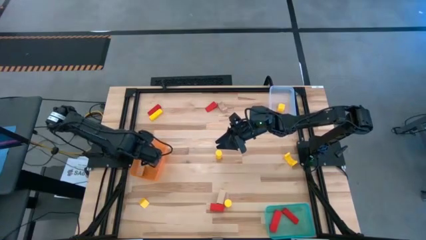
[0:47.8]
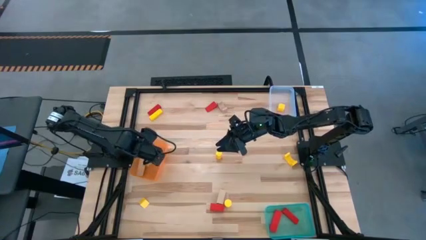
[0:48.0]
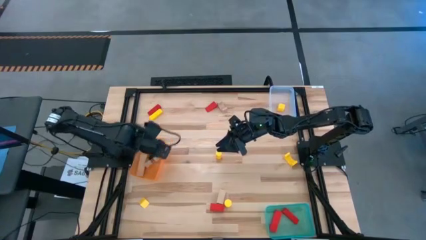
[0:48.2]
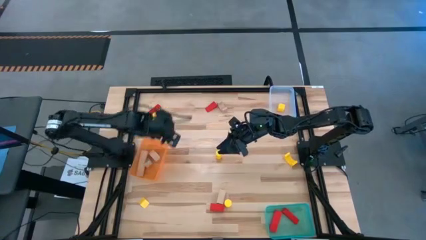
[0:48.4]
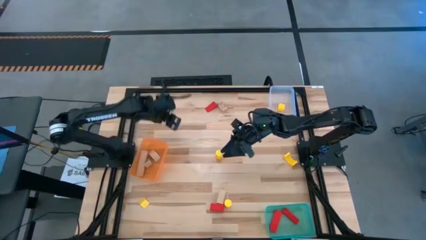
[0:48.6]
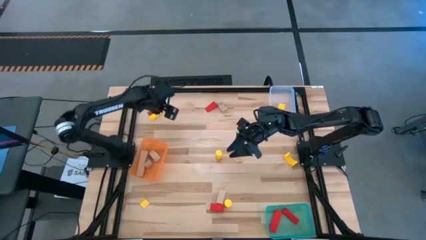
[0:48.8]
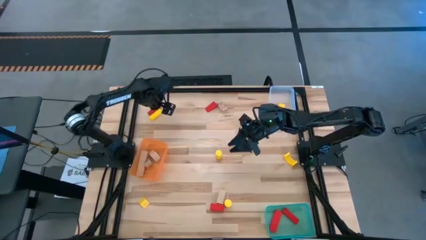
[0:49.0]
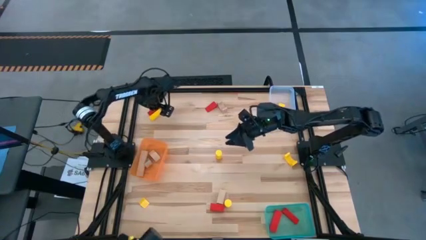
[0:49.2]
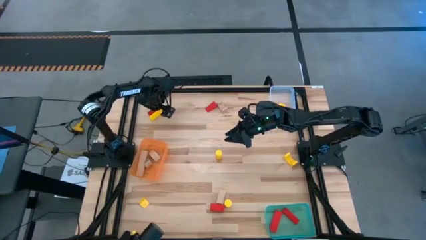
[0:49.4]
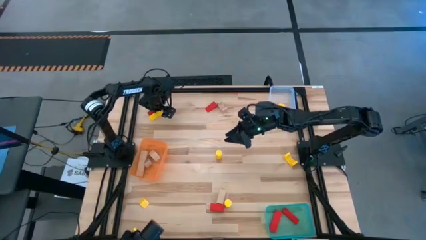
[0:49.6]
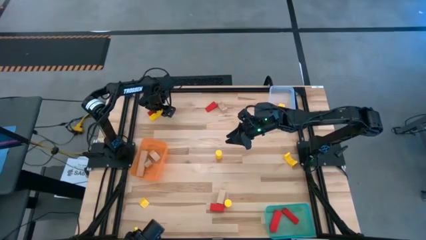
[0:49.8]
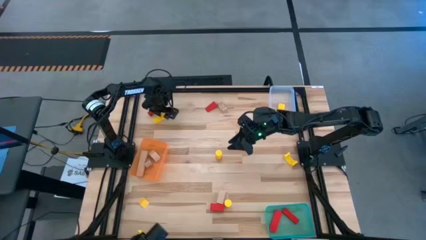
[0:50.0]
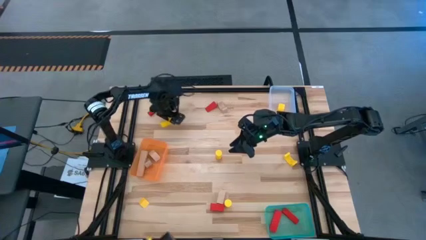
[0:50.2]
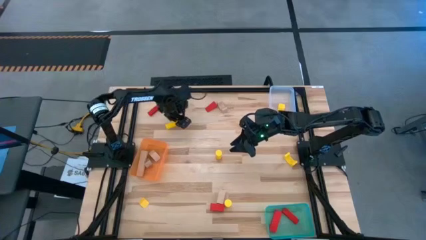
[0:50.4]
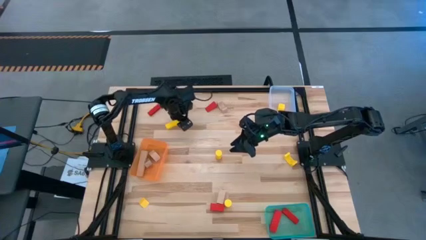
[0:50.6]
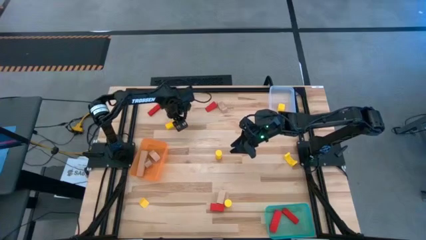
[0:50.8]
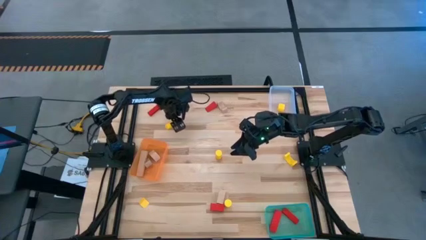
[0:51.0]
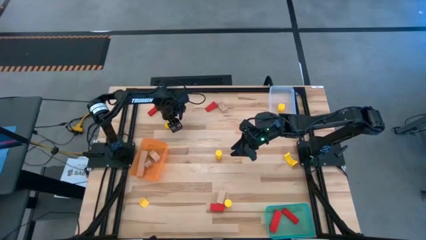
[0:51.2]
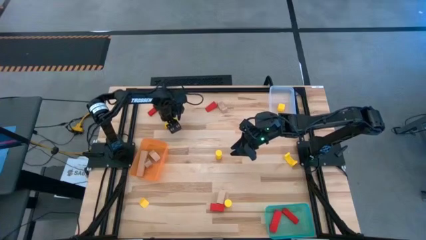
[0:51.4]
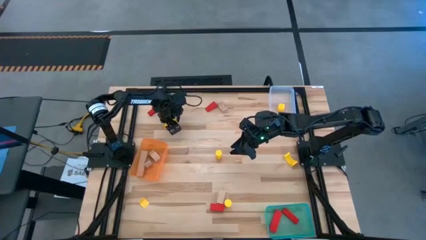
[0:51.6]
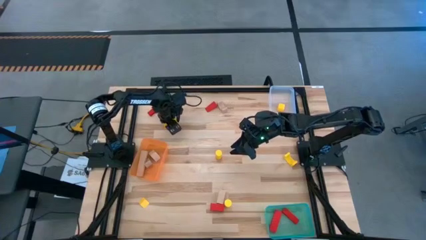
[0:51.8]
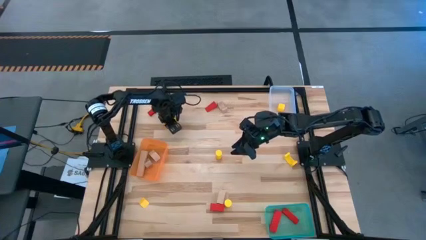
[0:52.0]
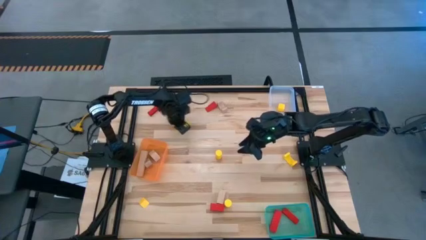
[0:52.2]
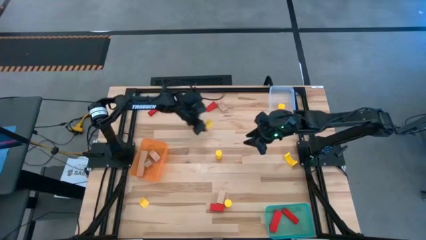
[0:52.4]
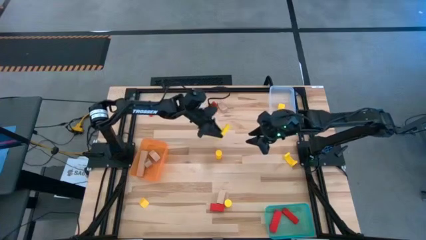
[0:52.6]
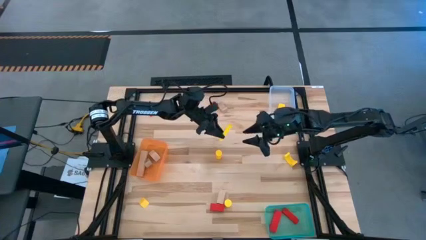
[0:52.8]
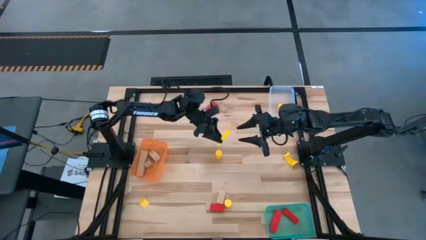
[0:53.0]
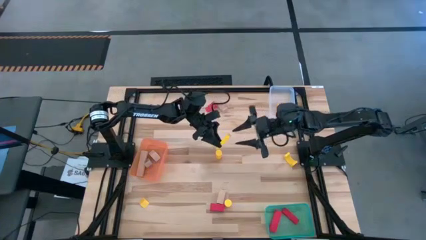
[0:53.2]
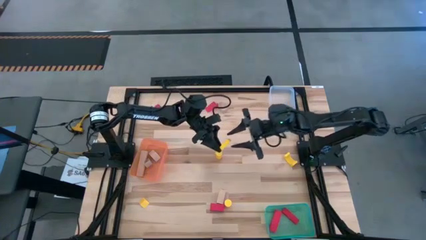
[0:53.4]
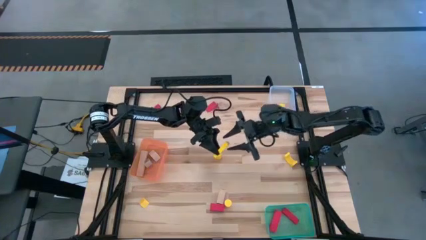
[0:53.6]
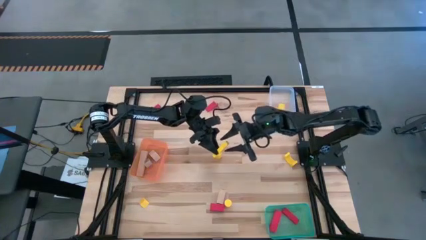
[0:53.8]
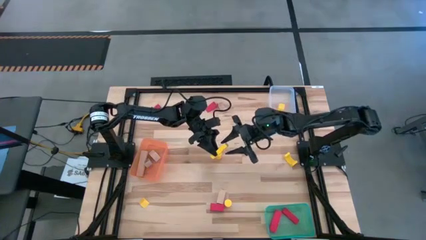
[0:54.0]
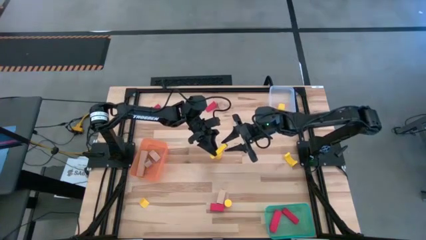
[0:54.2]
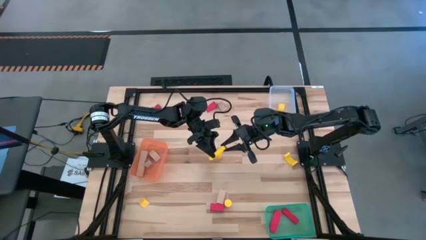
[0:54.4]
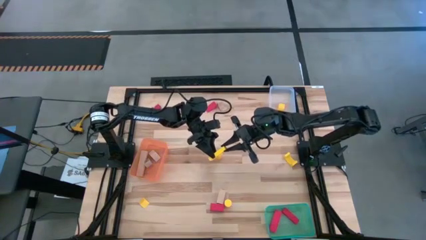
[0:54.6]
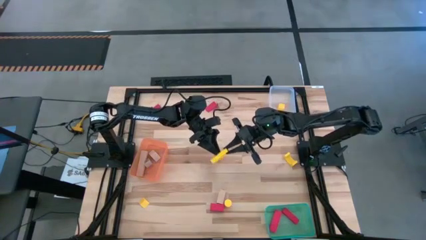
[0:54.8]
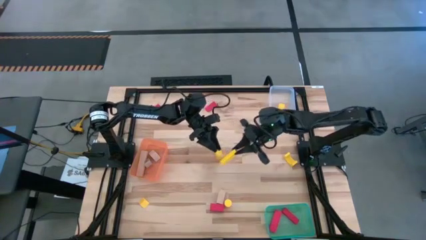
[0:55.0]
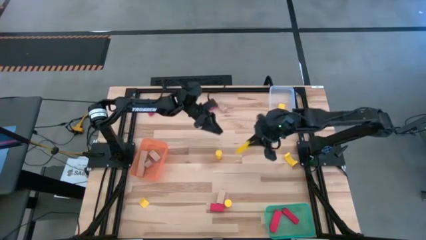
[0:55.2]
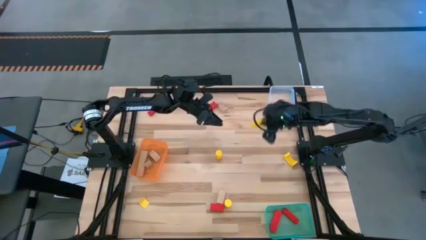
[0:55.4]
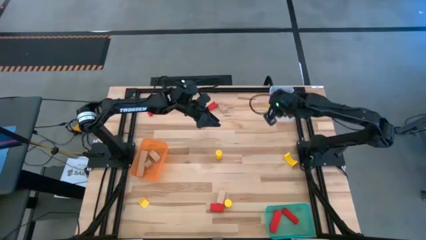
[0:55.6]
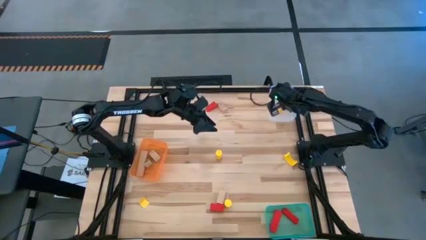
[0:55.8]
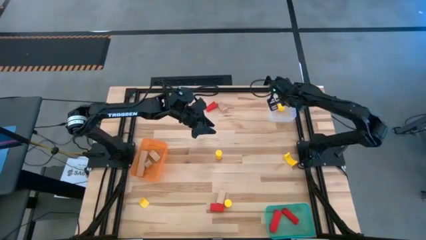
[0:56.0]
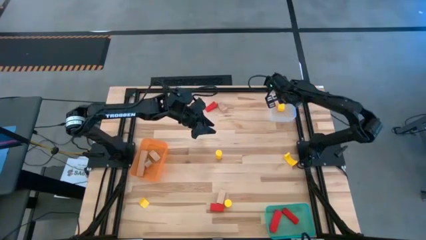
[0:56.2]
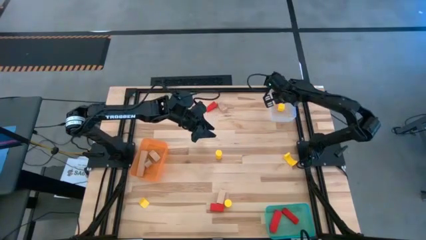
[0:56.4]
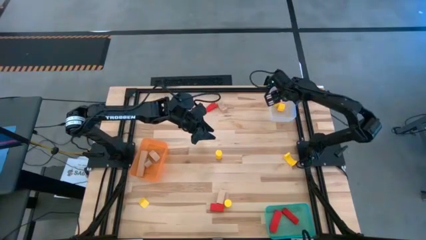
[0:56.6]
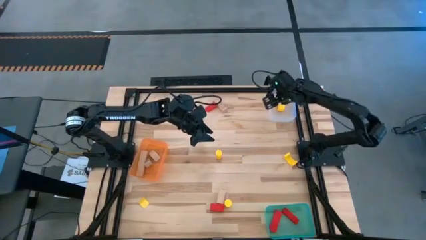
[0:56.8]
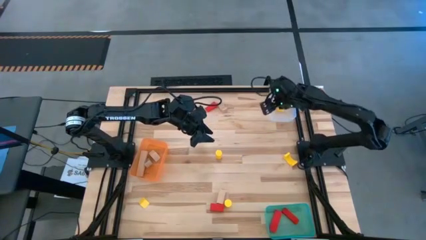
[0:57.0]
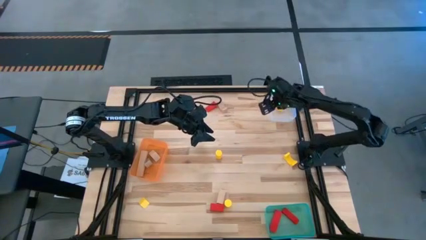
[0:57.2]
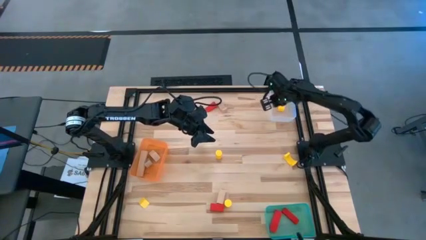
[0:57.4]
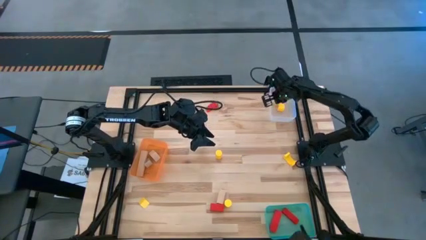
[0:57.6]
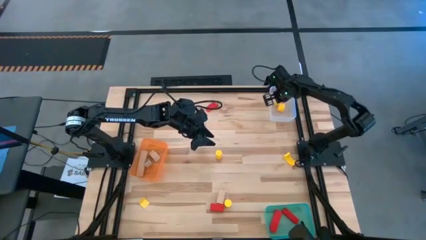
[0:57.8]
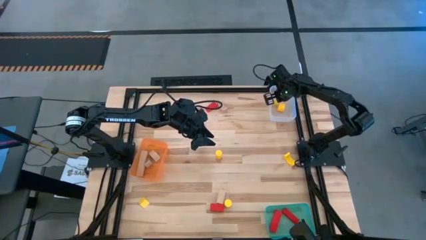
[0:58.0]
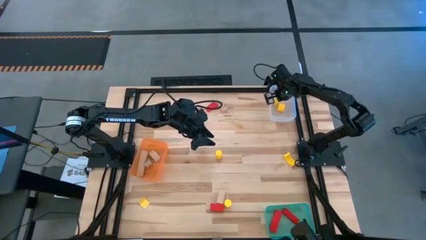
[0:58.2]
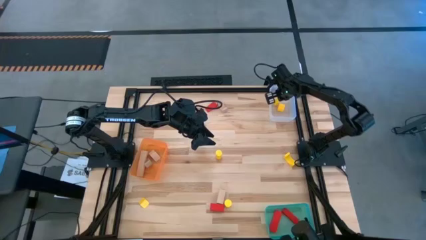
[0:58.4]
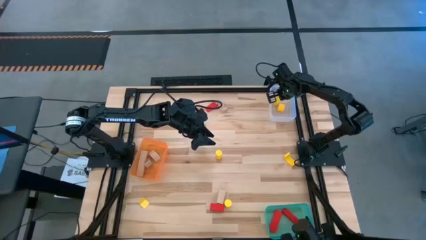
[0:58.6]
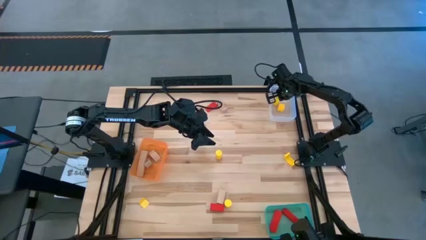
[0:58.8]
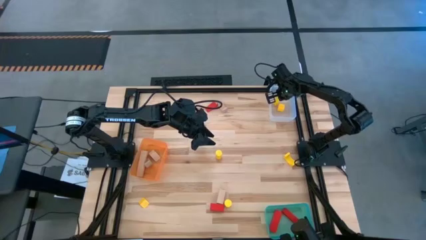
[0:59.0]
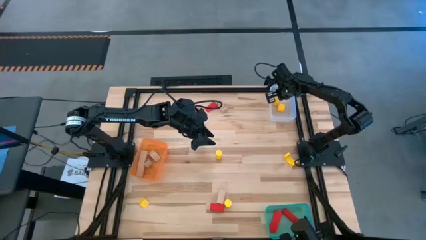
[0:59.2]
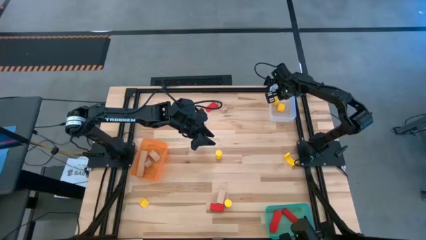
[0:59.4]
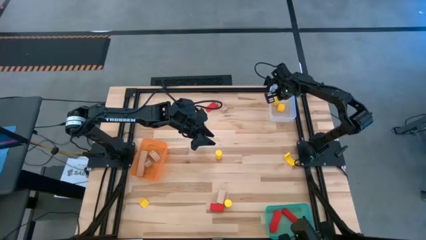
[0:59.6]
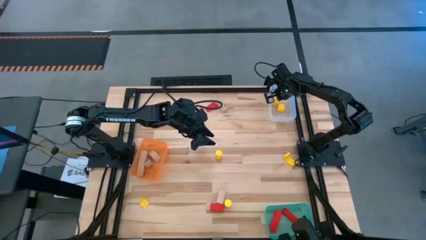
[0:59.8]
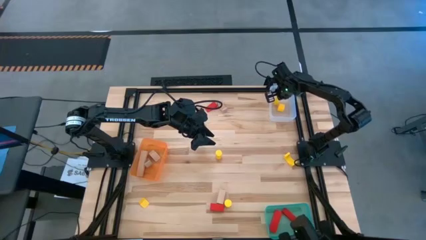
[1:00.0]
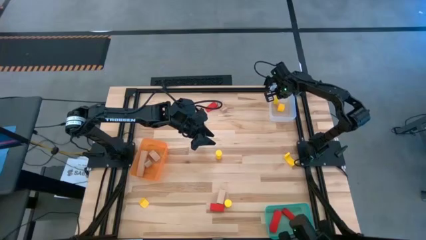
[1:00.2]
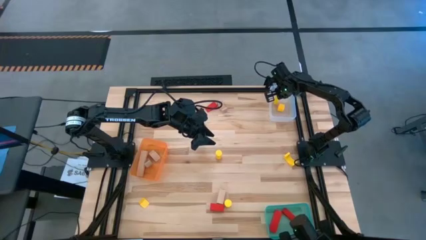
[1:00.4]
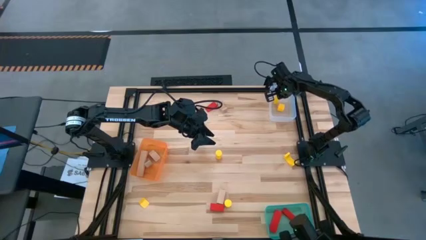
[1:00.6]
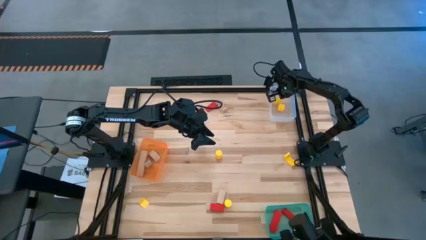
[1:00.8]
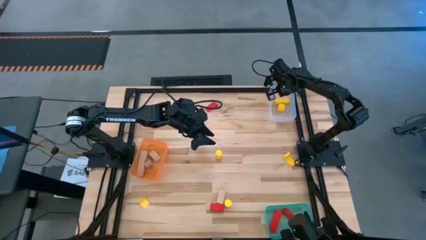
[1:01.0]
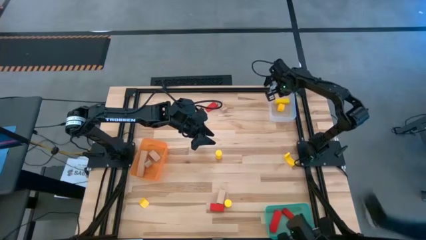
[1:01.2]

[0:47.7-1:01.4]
Task: Sort & place blocks by color
Put the yellow block into the transparent bin

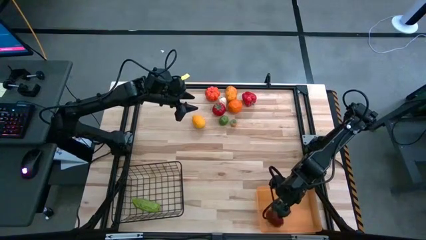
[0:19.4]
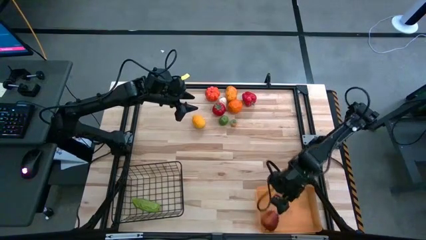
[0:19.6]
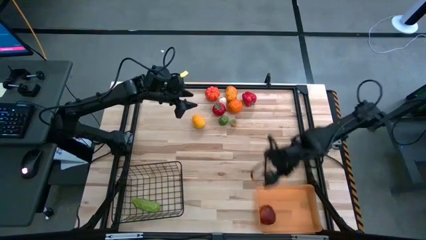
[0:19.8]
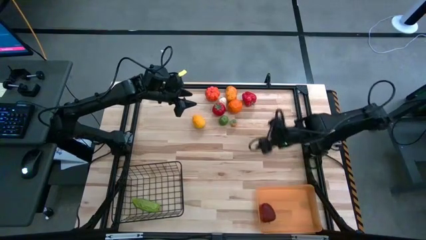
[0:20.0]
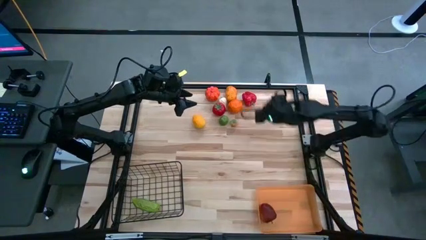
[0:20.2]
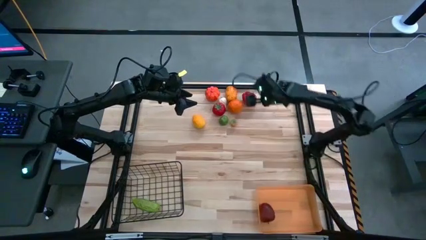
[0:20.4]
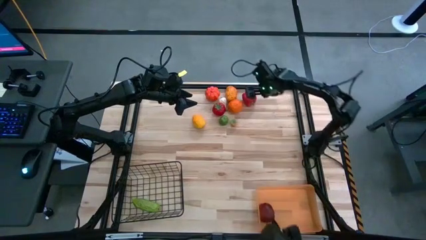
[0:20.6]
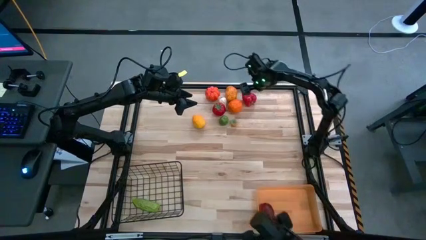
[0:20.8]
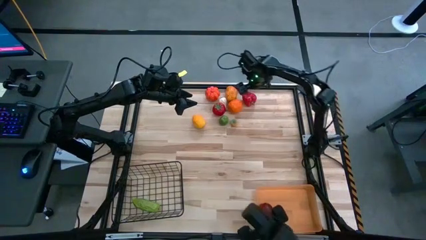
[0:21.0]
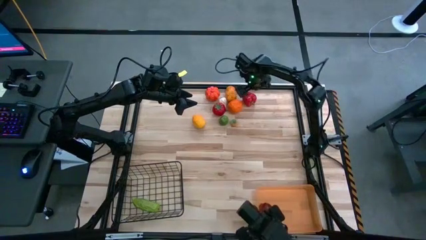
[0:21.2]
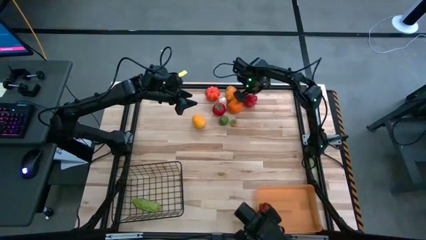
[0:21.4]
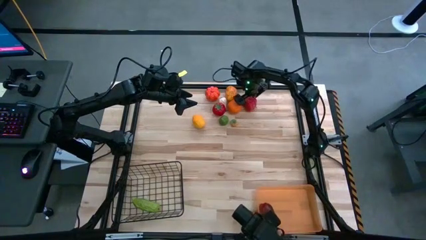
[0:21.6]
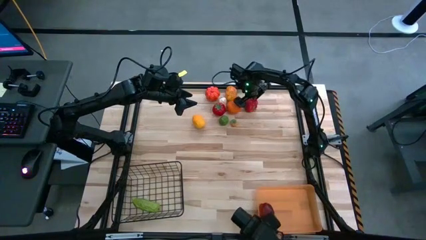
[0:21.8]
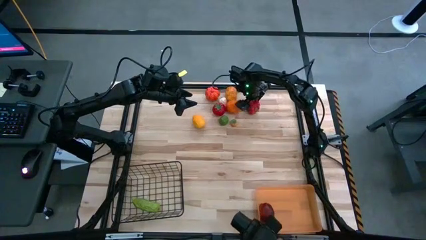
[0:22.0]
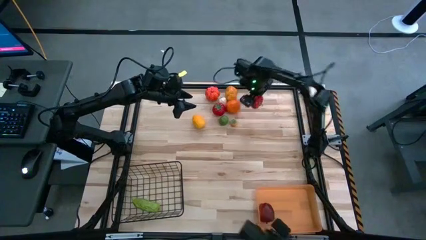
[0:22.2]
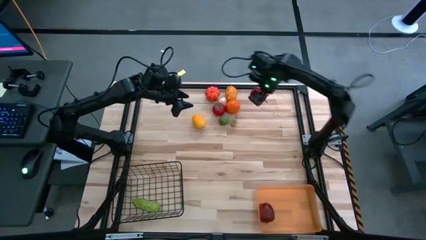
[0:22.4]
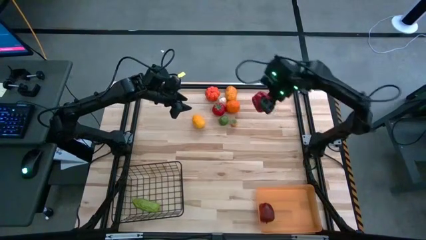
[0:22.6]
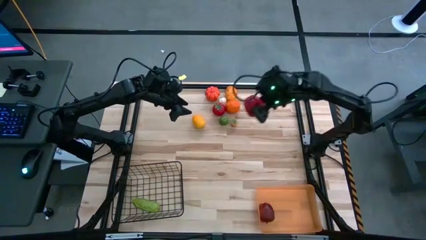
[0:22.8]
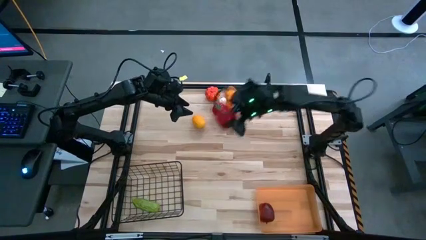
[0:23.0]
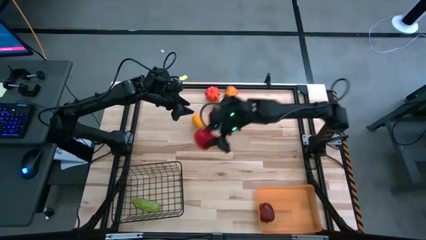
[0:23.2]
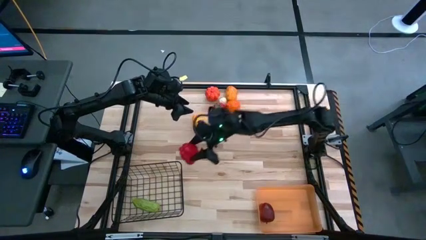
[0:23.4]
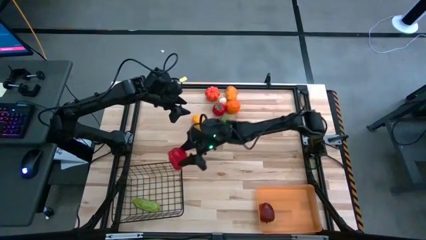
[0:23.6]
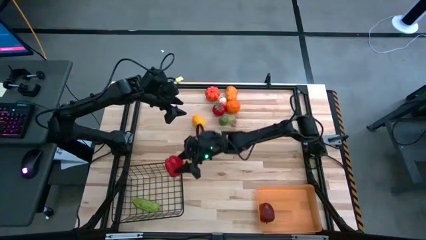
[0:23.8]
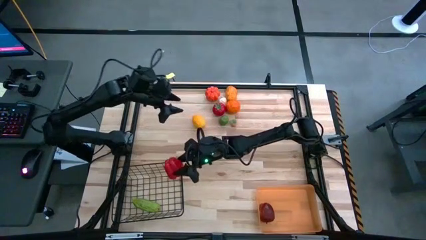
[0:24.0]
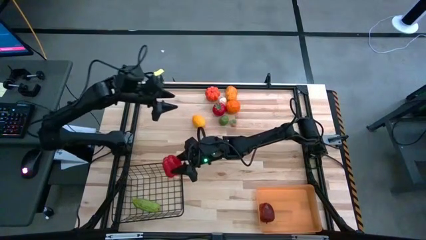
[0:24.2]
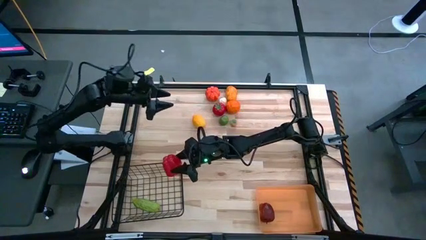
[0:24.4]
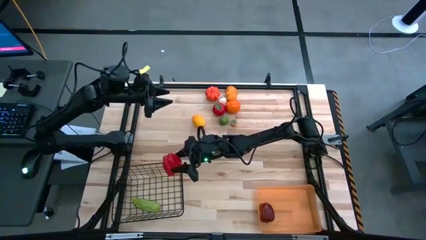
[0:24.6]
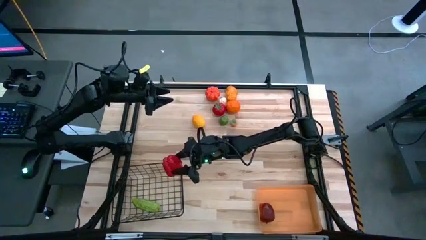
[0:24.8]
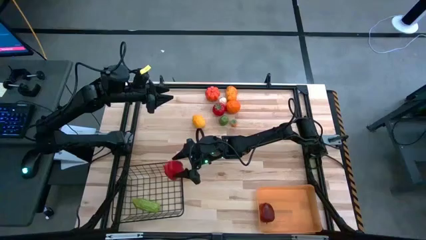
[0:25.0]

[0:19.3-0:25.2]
Task: Sort produce into baskets
Put the red bell pepper into the black wire basket
